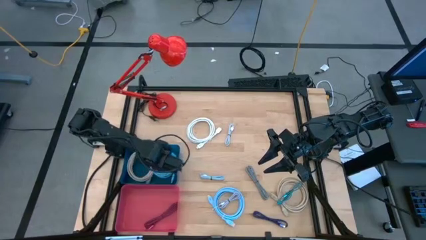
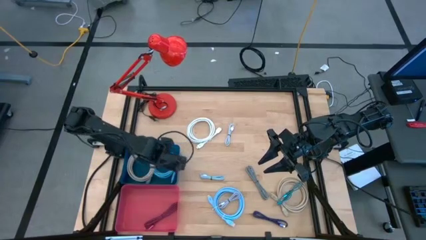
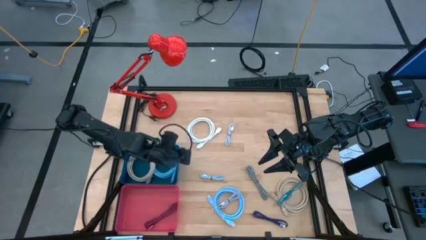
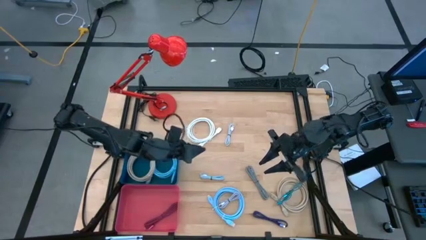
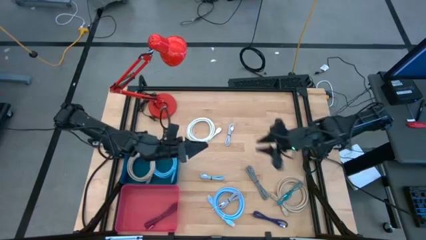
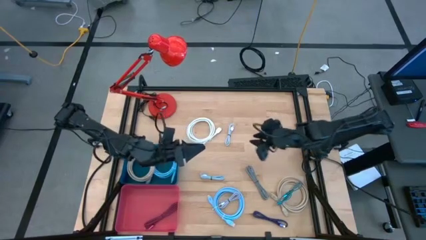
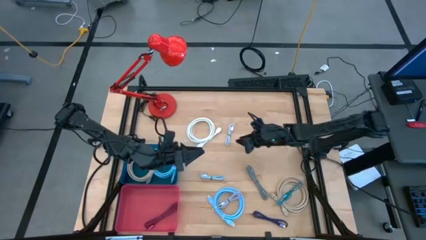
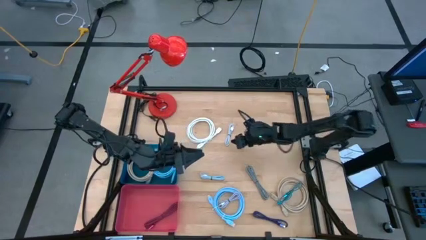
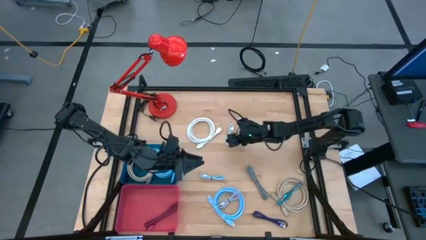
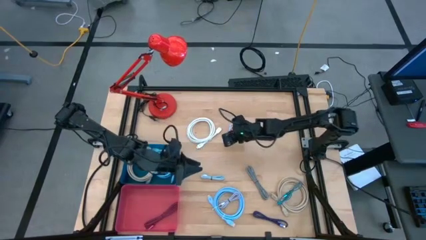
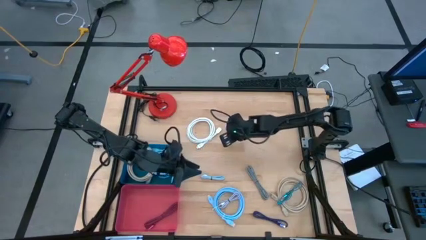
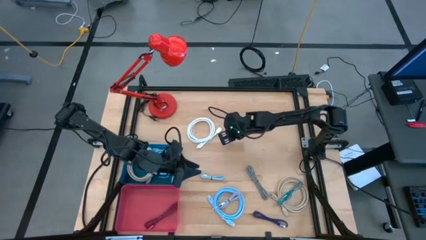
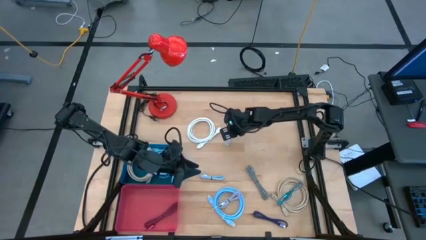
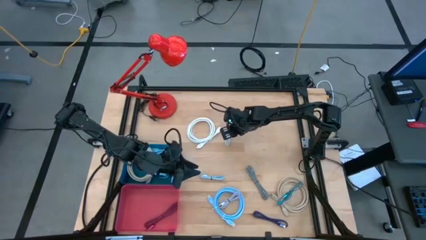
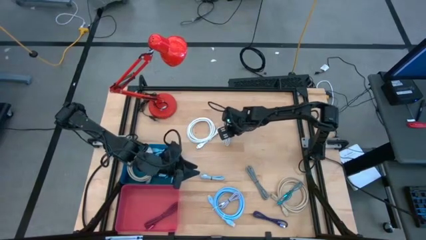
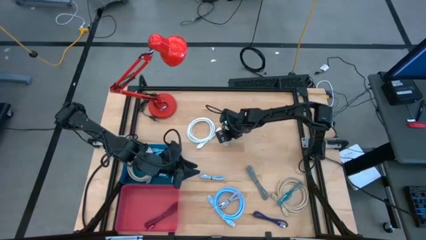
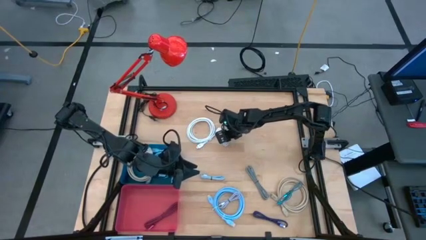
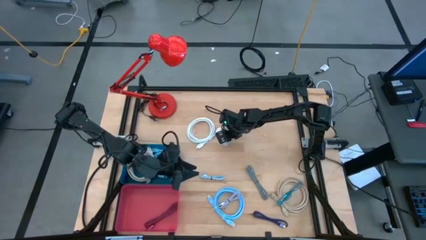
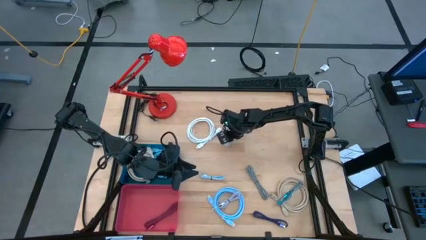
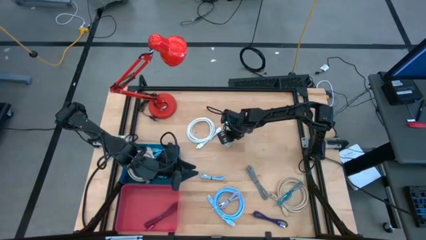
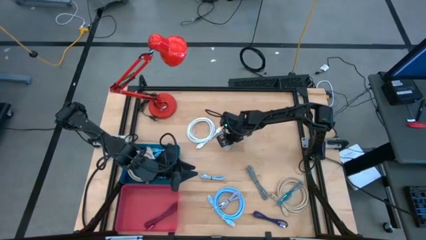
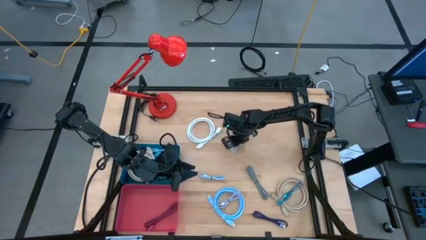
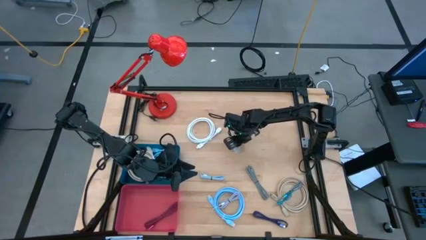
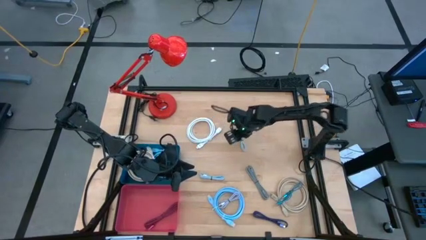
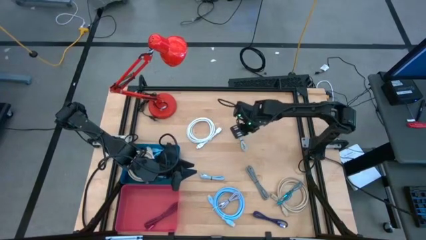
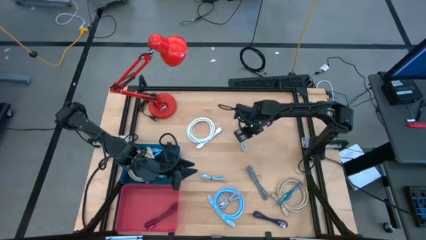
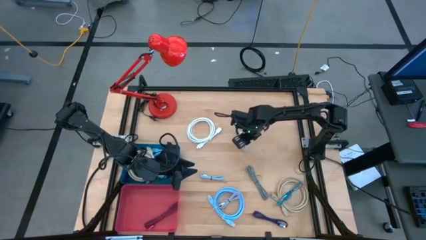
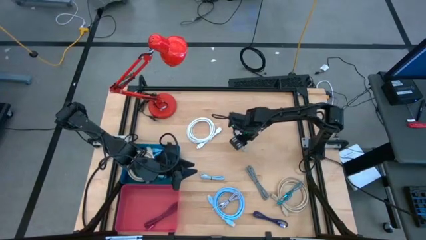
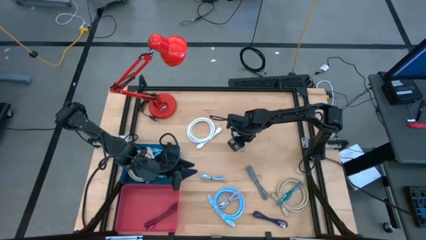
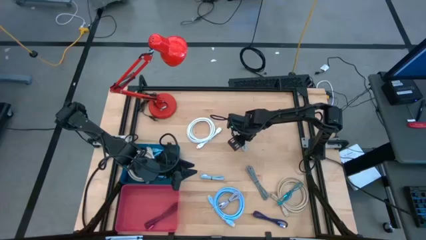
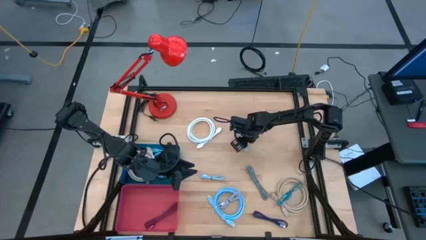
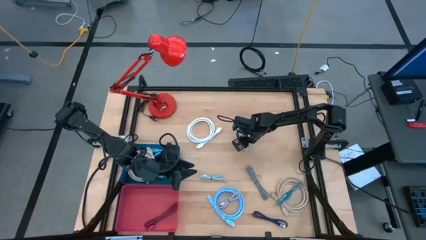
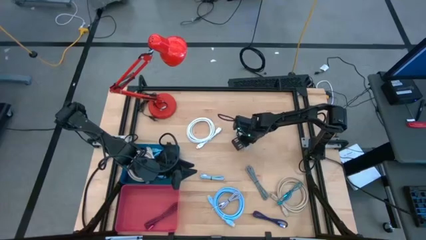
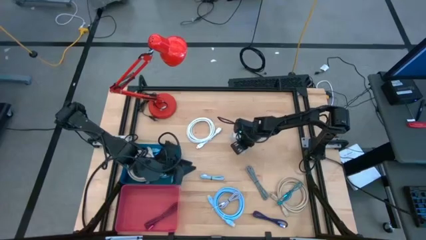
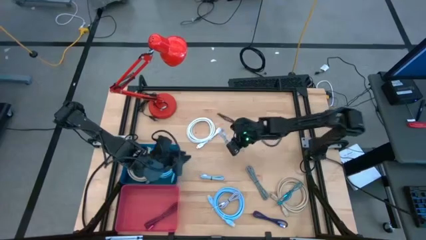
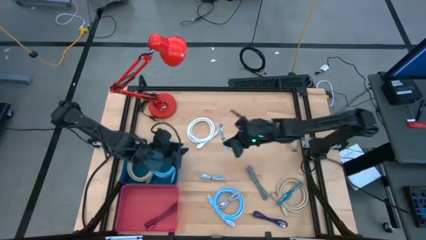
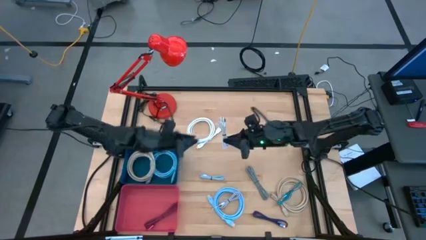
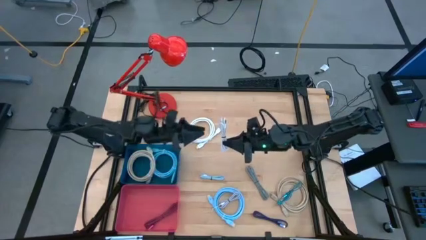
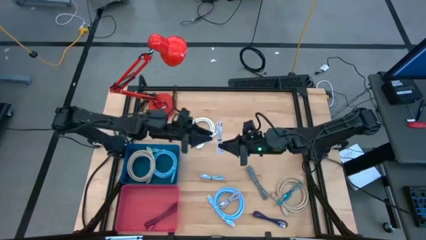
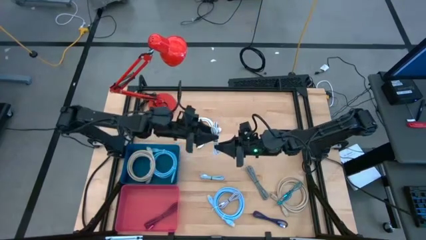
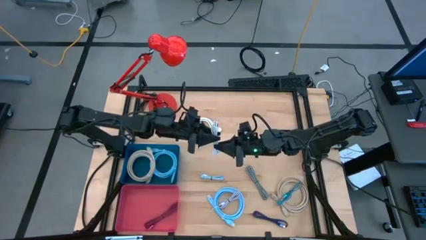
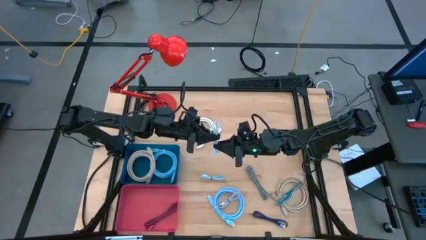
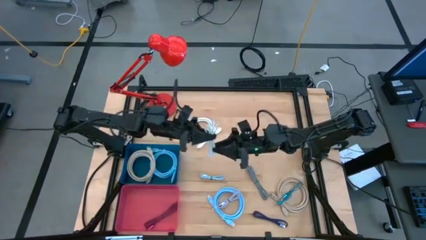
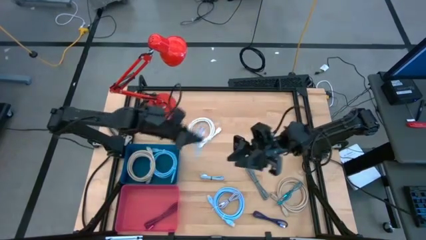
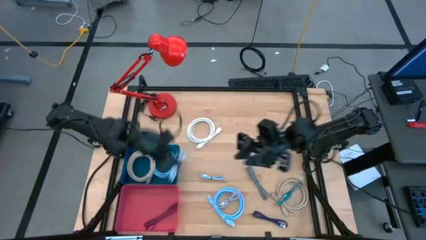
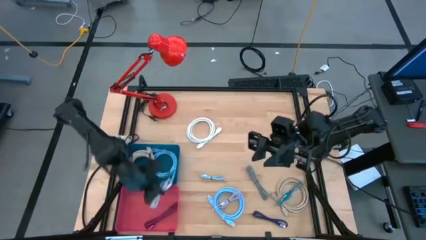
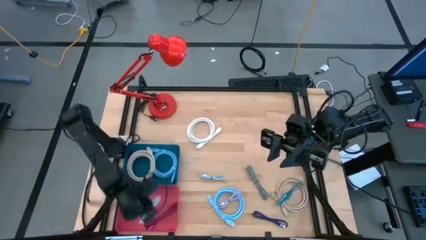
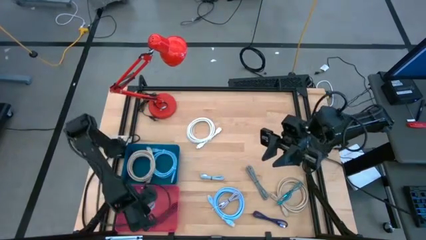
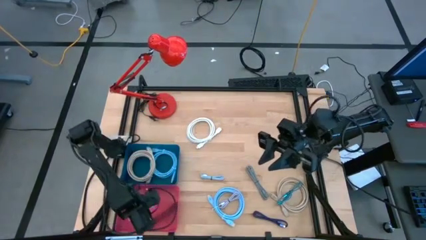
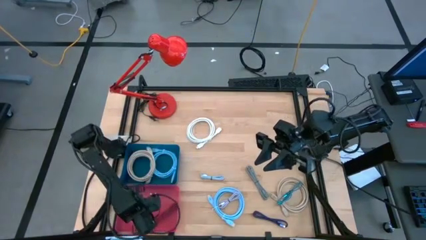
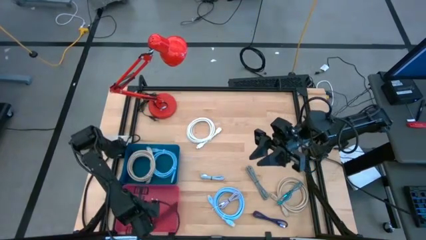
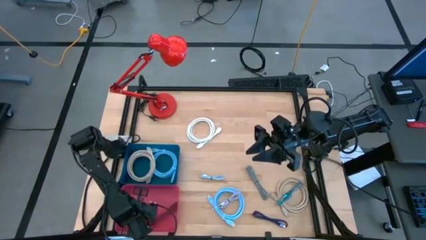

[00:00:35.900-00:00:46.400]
Task: Pick & Place USB Port
Put the white USB cable into the red bin
